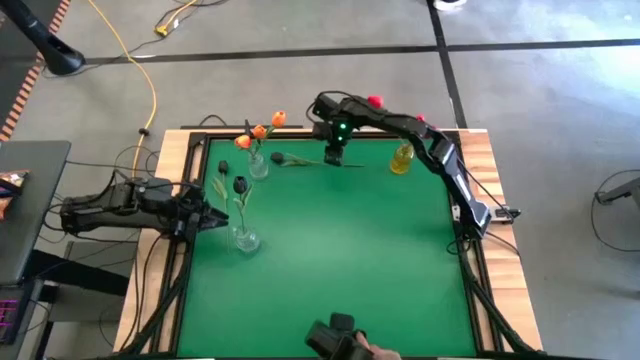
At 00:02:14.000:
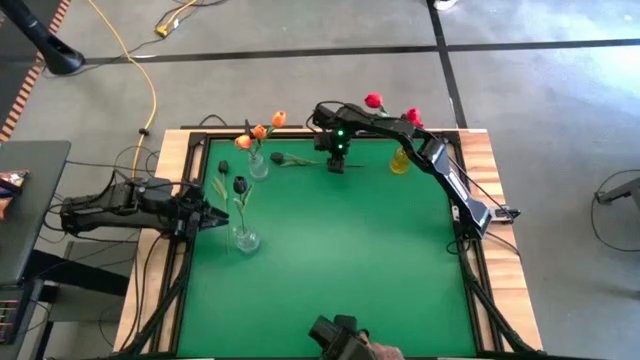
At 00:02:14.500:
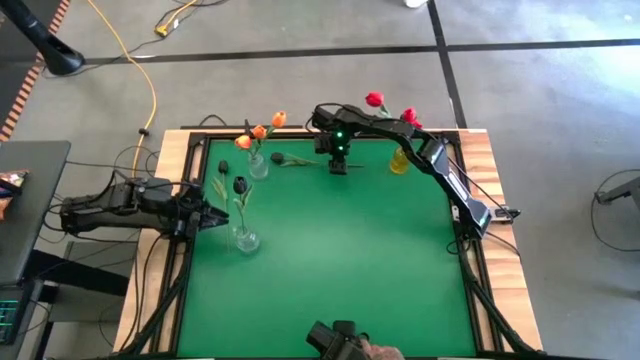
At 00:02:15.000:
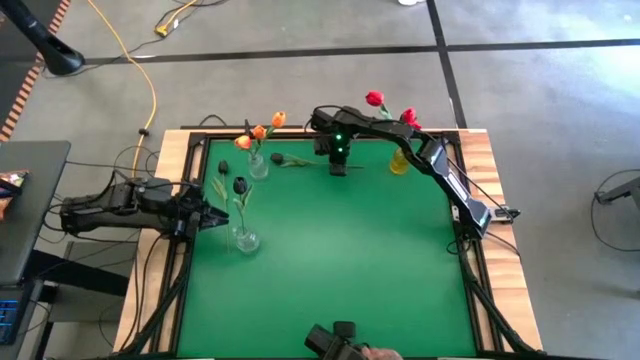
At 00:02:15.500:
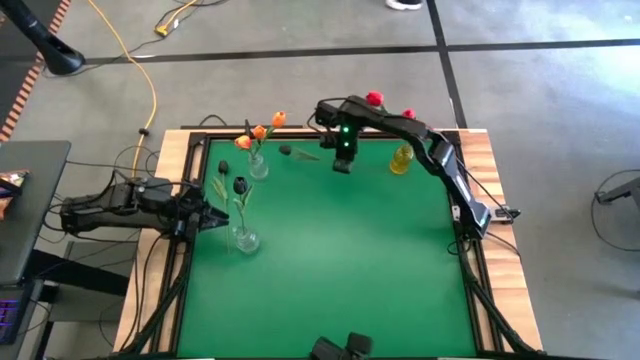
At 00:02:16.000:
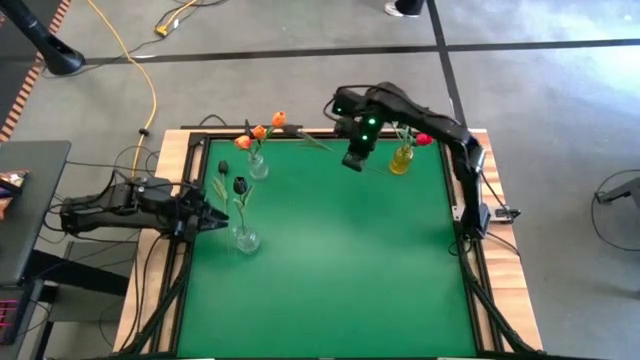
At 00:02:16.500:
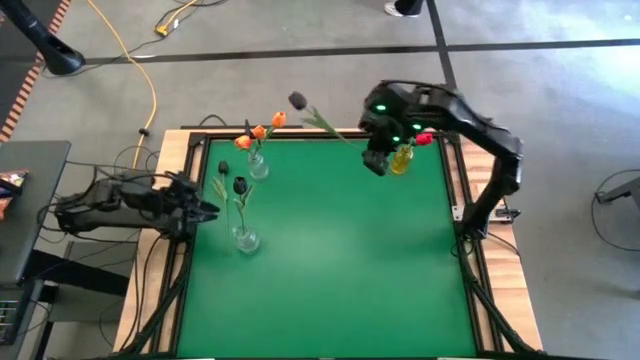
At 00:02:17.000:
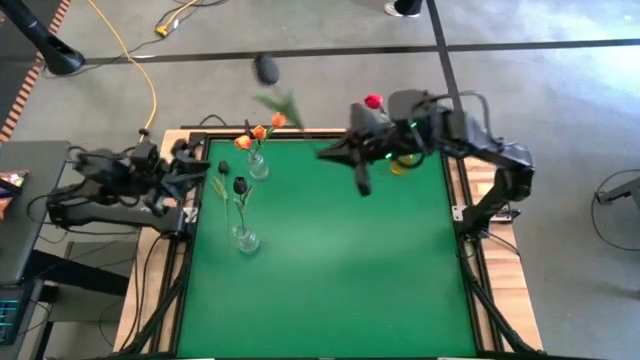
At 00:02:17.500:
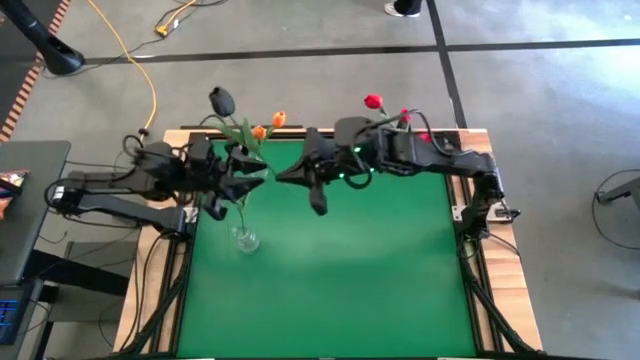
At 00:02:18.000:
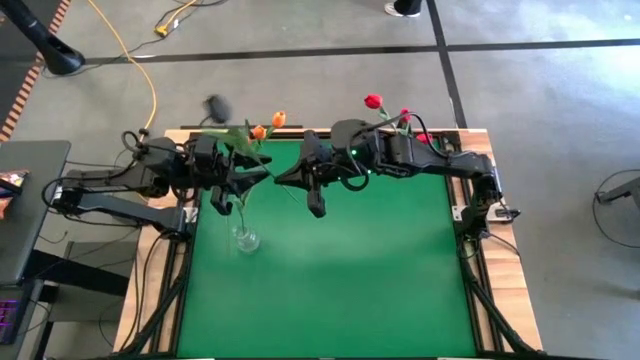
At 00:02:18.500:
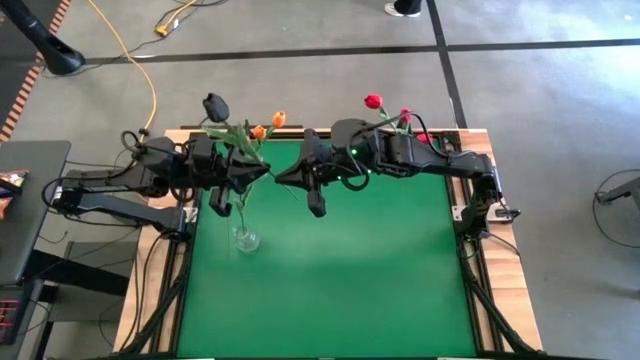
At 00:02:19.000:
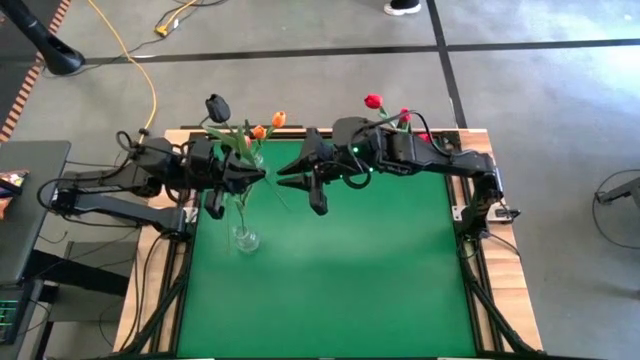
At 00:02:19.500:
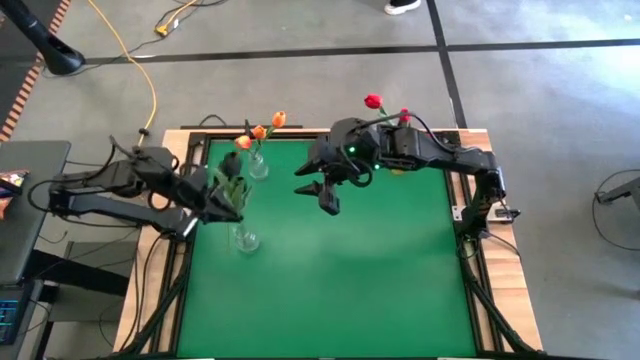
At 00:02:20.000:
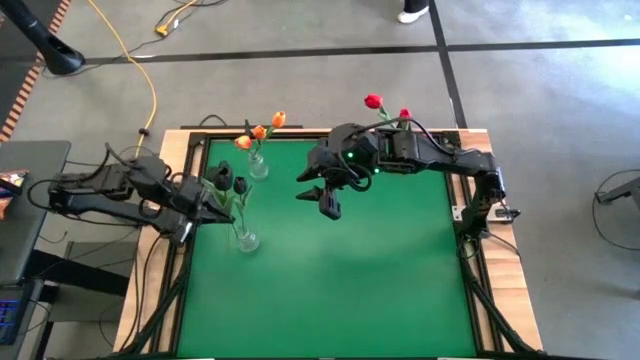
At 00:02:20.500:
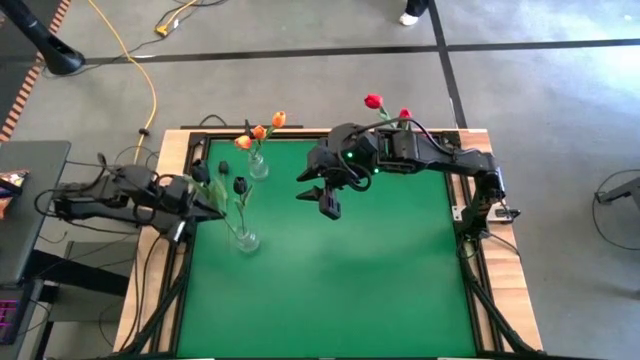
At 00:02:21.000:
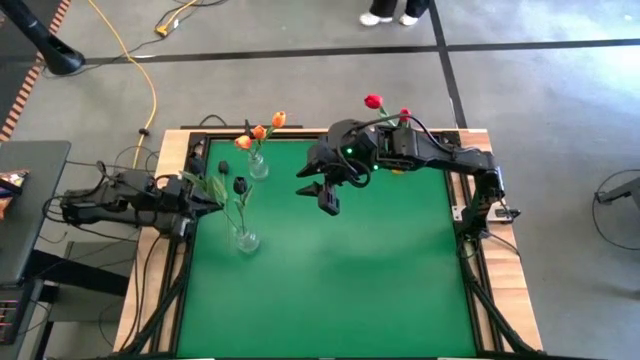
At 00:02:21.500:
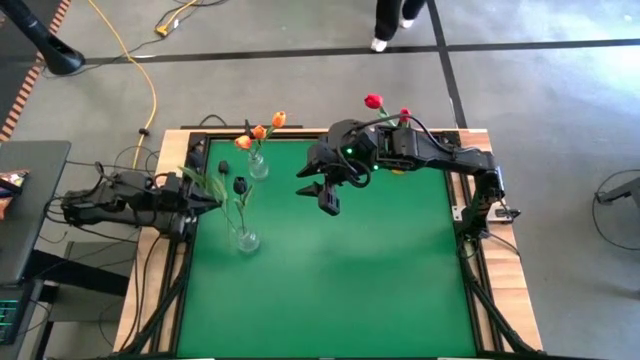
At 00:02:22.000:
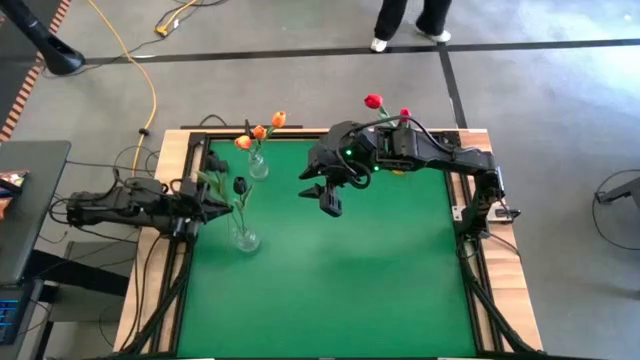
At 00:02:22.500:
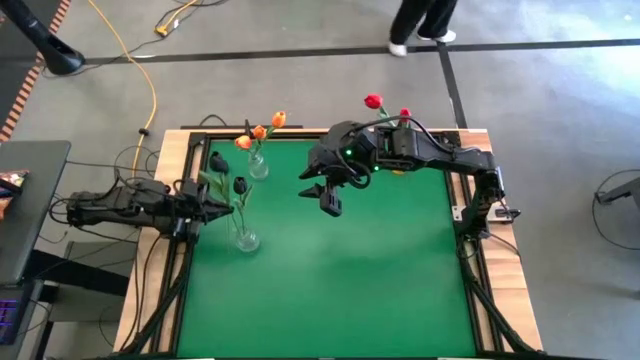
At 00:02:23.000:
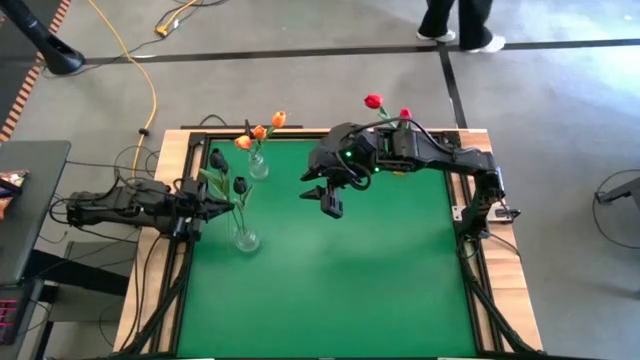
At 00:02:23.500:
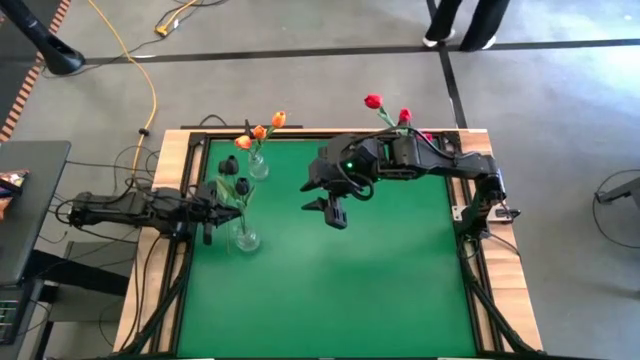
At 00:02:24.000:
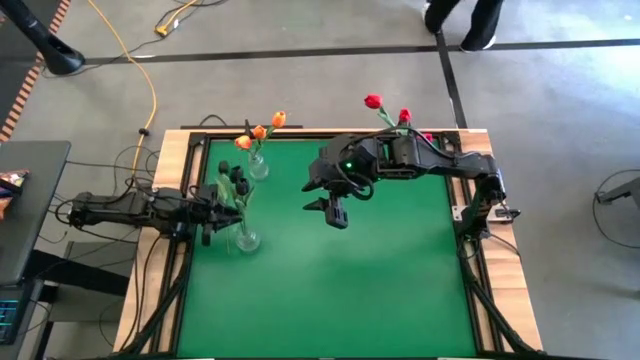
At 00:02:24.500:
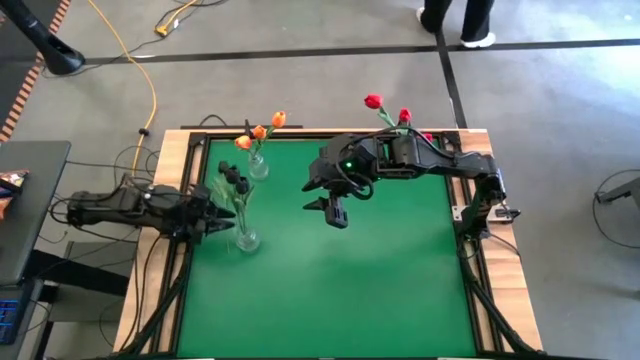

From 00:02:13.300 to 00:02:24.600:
Task: Sort flowers into vase by color
Put the right black flower into the bottom transparent vase

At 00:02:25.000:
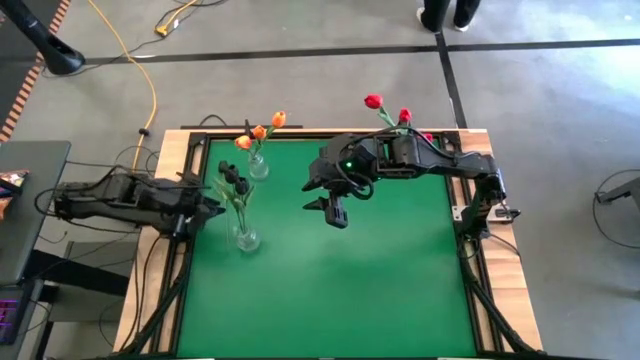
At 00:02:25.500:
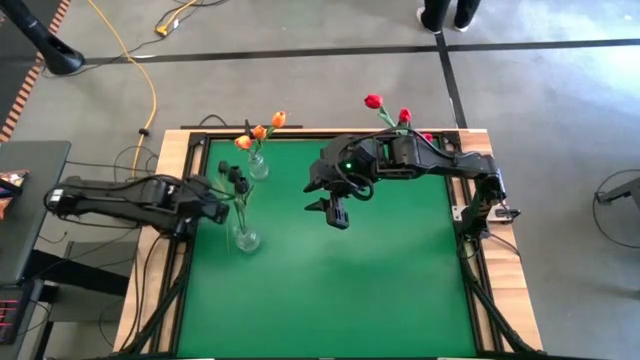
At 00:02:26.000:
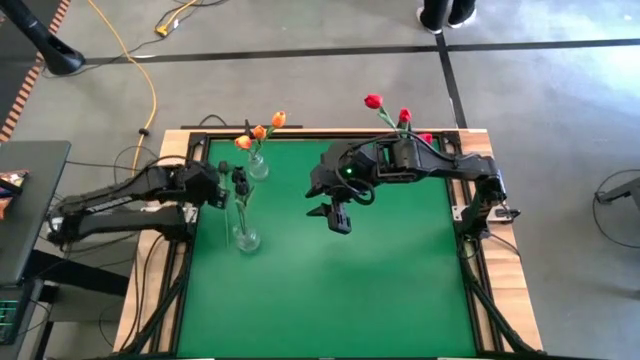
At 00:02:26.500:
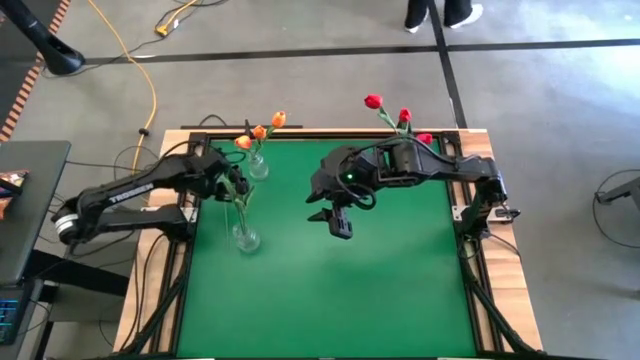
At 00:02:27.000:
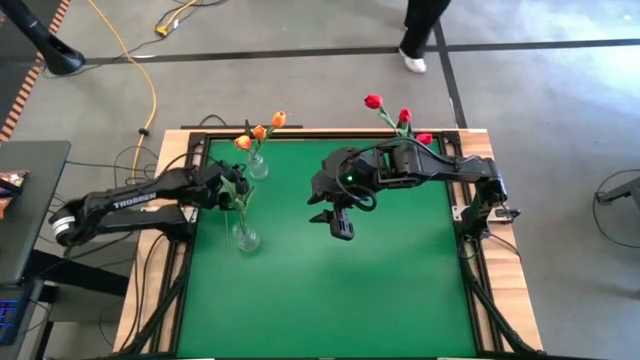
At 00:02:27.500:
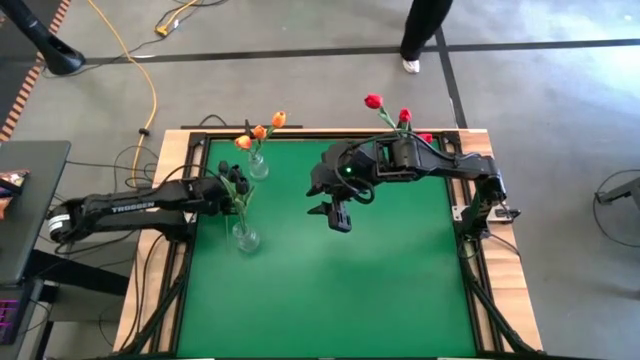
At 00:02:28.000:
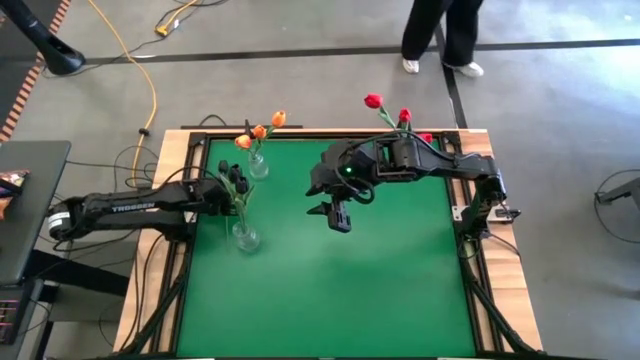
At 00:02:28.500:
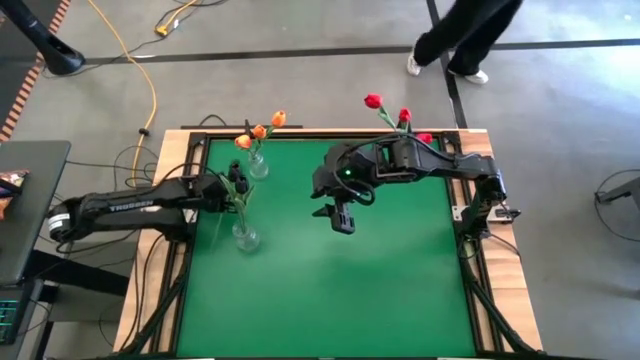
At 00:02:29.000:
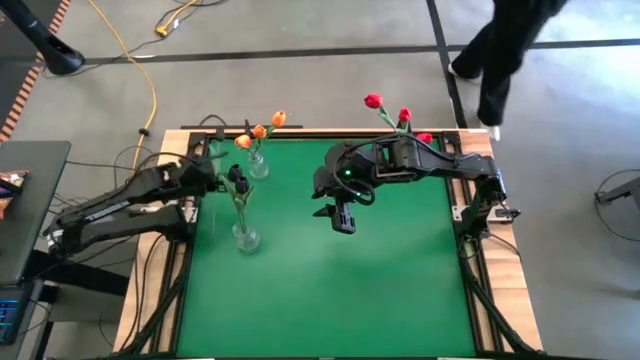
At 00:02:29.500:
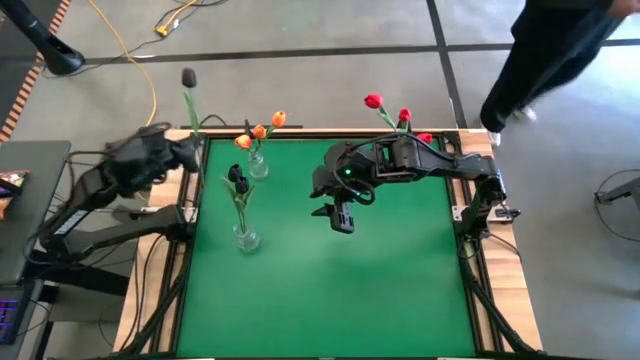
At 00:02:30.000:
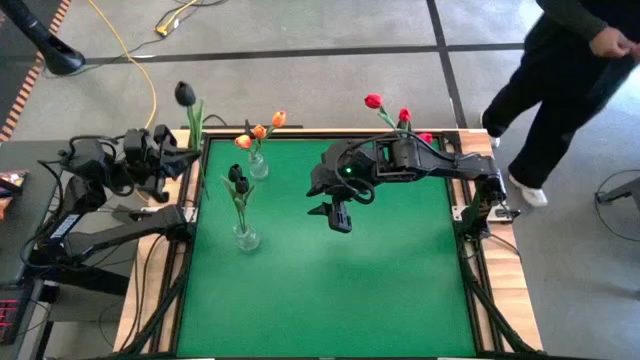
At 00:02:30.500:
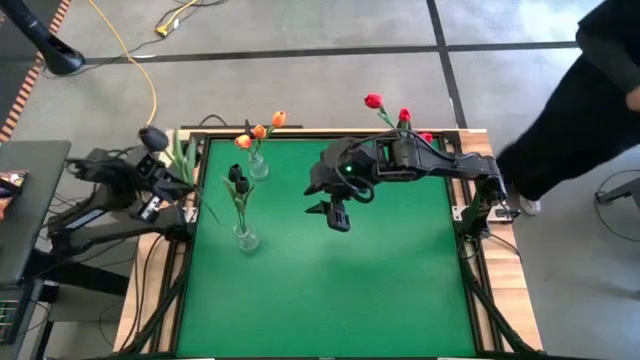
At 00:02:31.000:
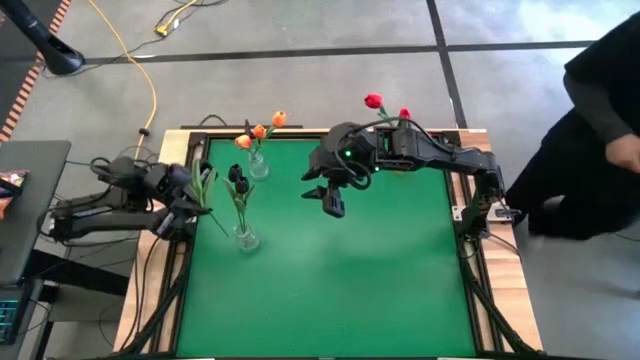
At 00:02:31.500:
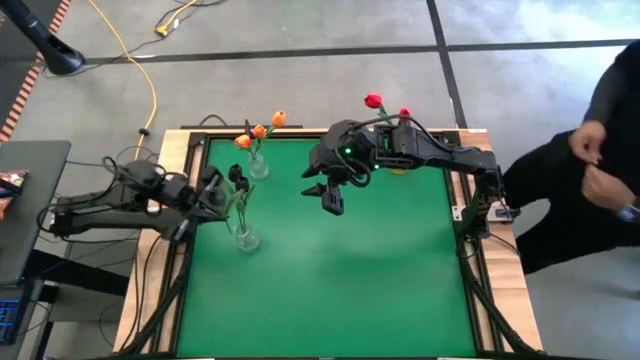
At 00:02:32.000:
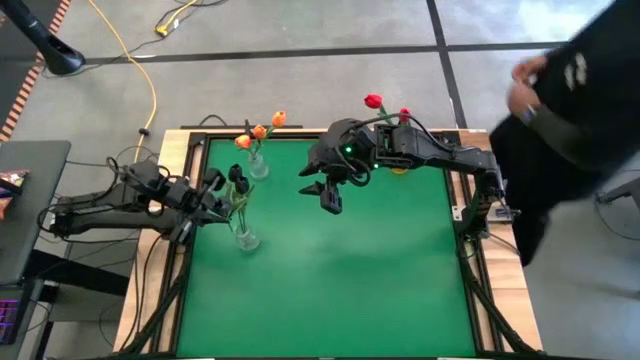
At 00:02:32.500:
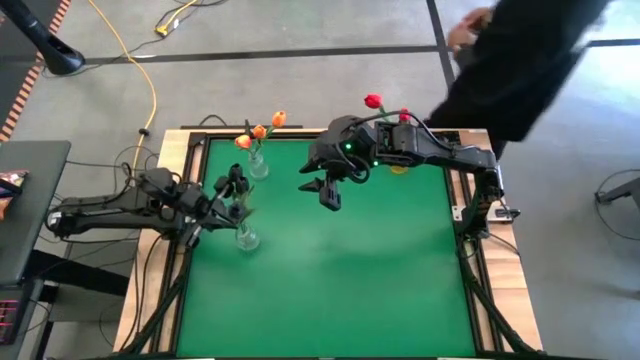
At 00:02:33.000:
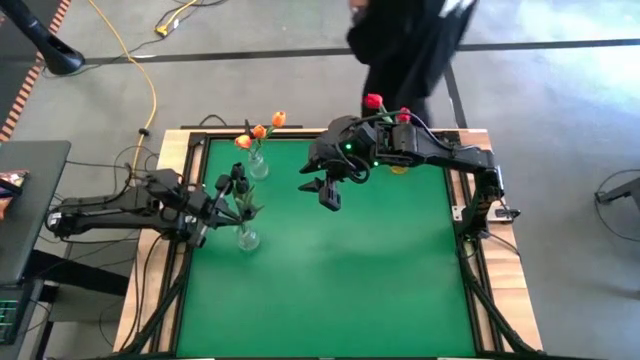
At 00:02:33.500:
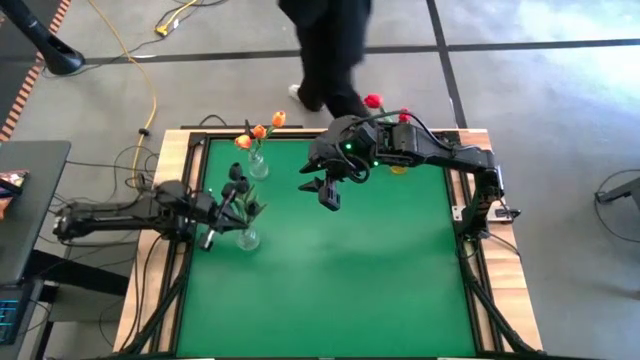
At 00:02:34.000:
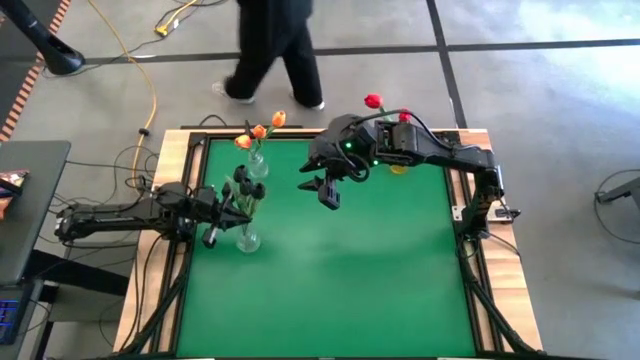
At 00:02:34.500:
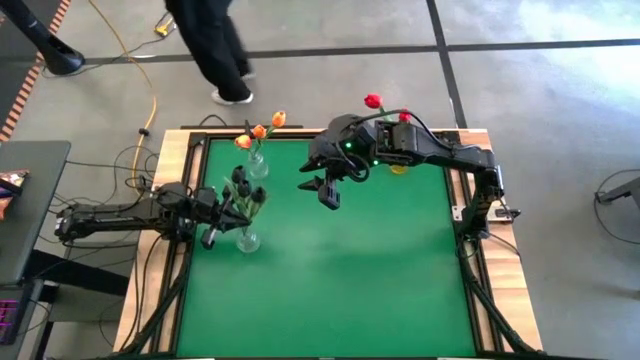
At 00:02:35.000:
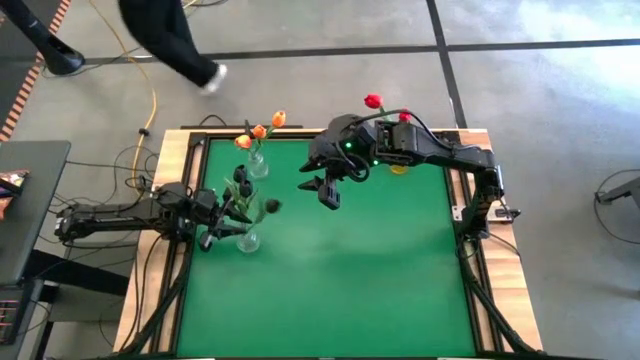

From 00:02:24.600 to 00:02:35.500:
Put the black flower into the bottom transparent vase
